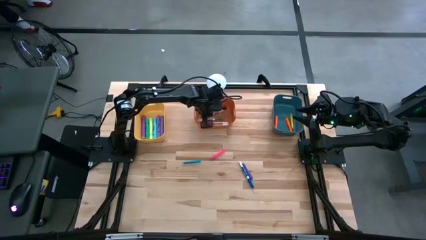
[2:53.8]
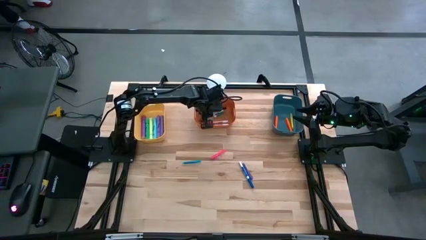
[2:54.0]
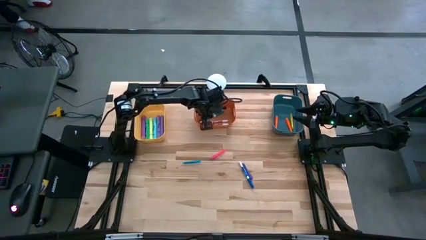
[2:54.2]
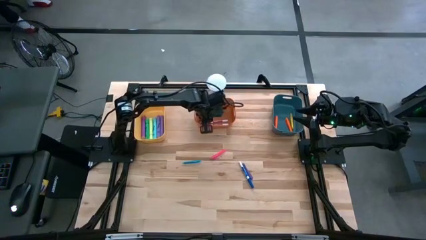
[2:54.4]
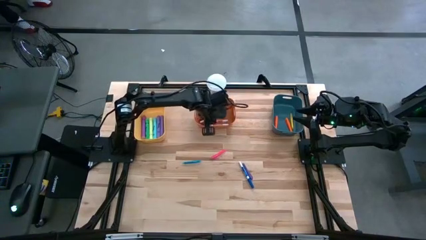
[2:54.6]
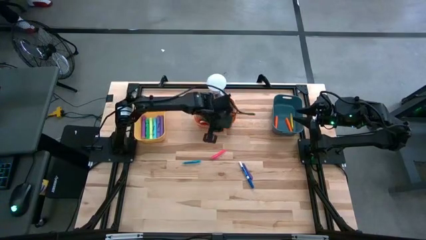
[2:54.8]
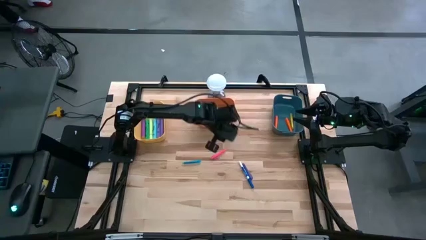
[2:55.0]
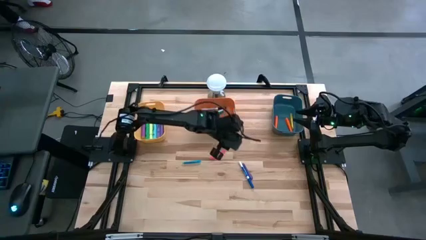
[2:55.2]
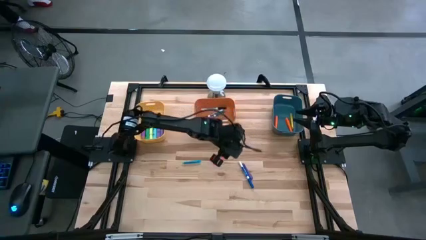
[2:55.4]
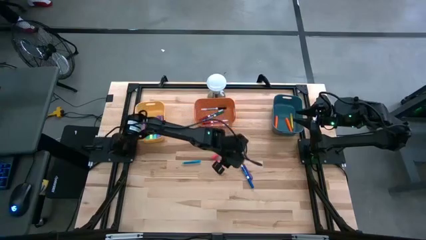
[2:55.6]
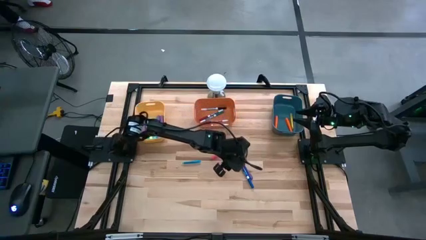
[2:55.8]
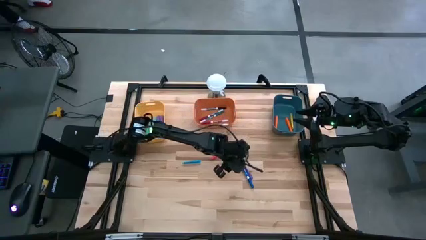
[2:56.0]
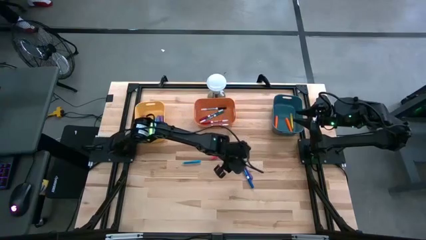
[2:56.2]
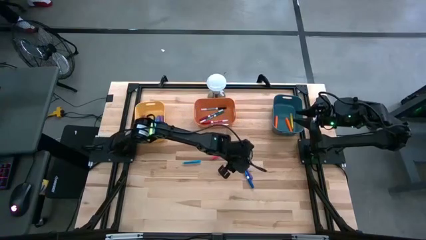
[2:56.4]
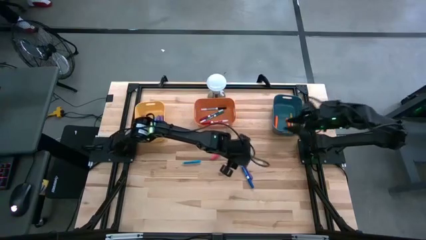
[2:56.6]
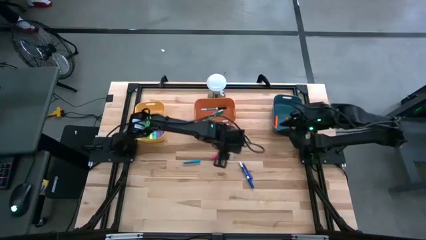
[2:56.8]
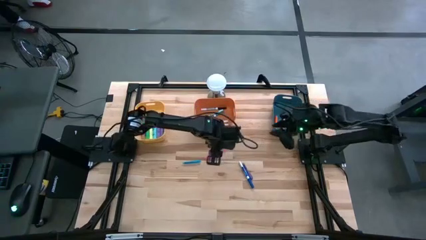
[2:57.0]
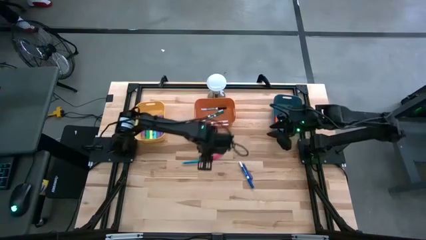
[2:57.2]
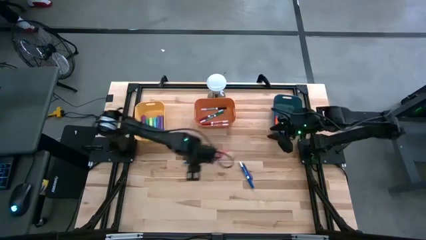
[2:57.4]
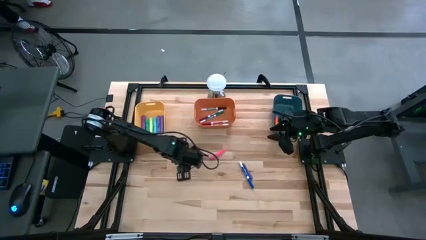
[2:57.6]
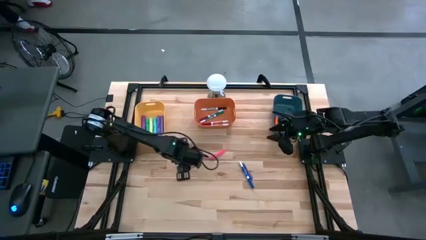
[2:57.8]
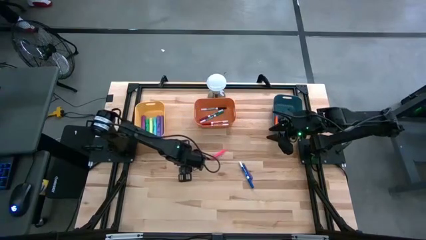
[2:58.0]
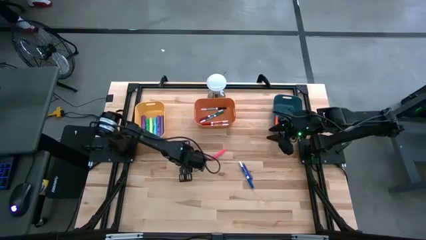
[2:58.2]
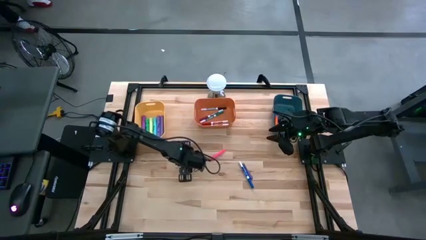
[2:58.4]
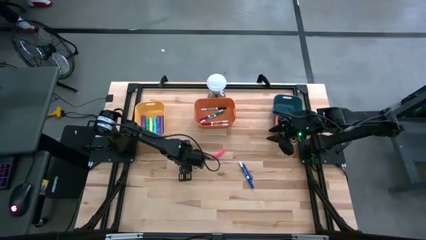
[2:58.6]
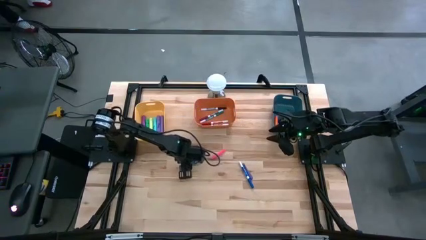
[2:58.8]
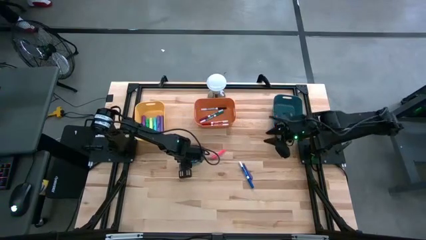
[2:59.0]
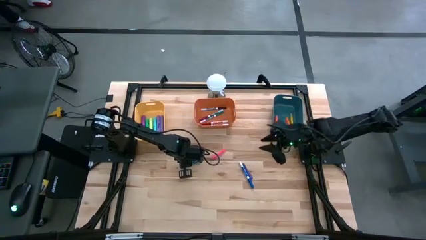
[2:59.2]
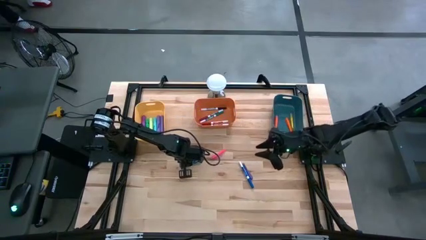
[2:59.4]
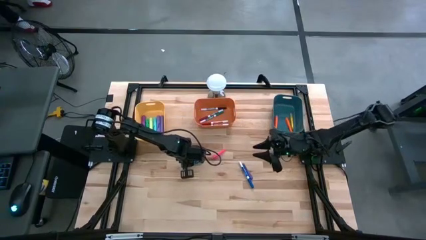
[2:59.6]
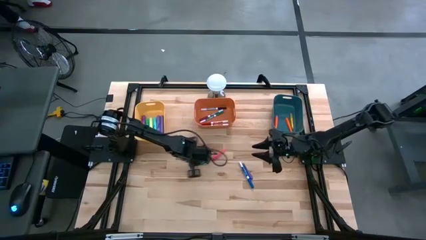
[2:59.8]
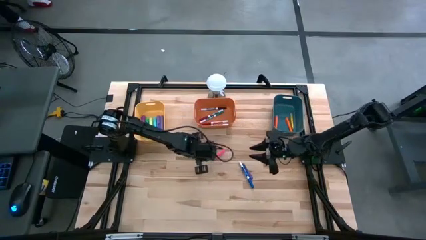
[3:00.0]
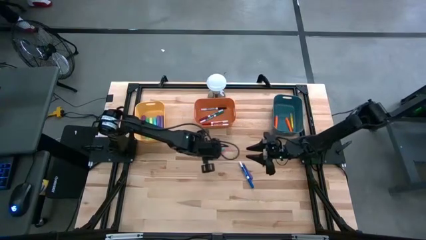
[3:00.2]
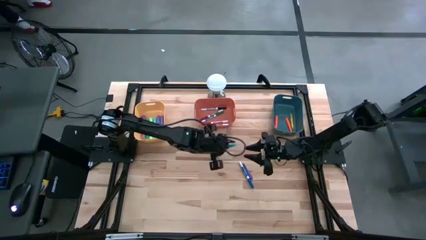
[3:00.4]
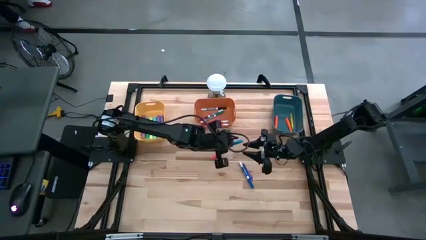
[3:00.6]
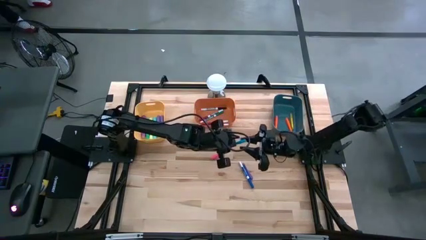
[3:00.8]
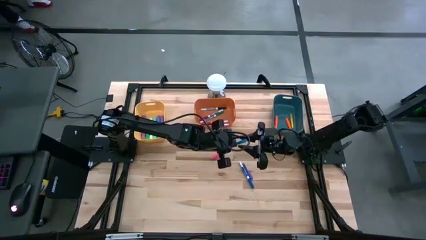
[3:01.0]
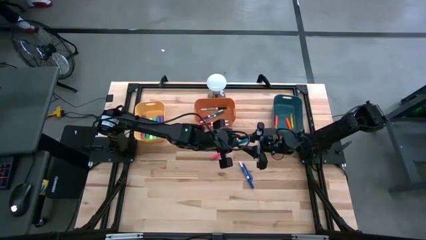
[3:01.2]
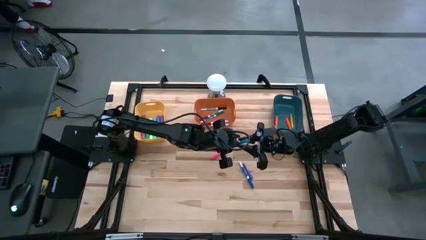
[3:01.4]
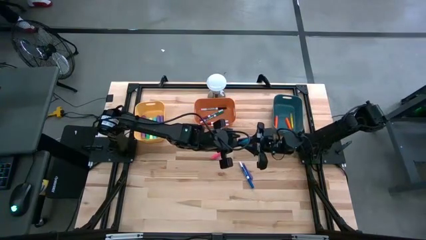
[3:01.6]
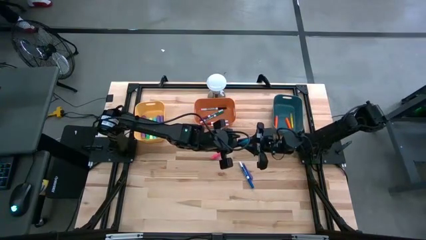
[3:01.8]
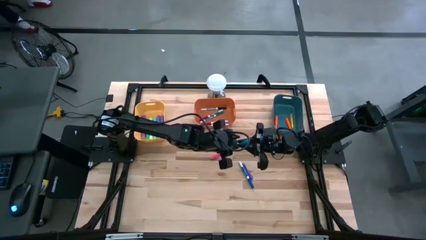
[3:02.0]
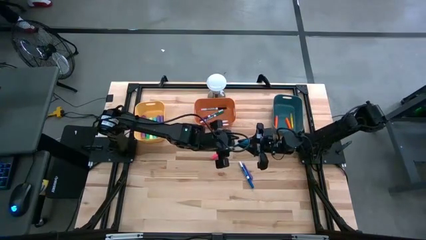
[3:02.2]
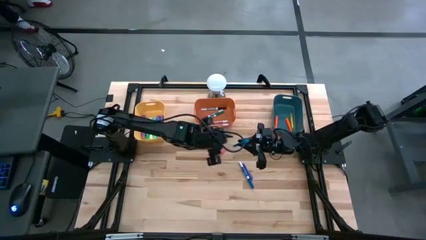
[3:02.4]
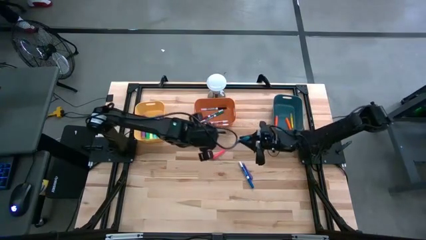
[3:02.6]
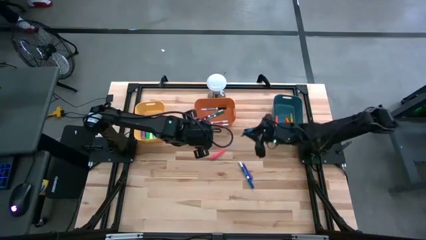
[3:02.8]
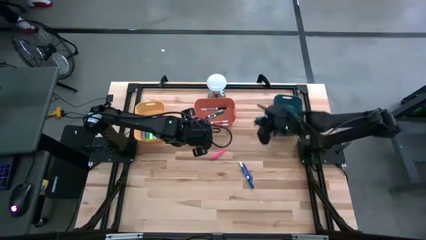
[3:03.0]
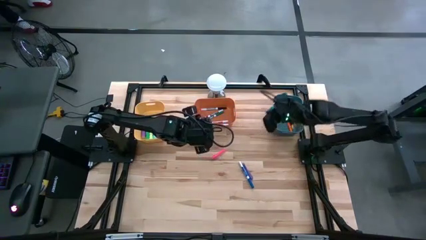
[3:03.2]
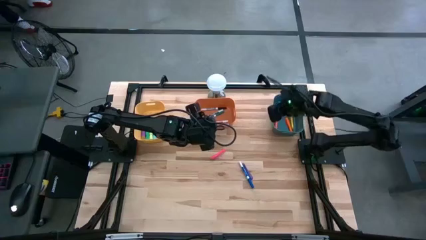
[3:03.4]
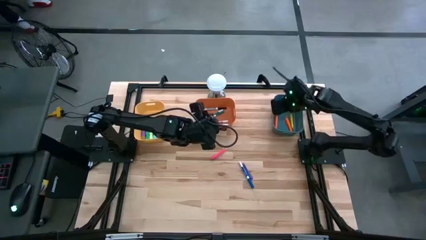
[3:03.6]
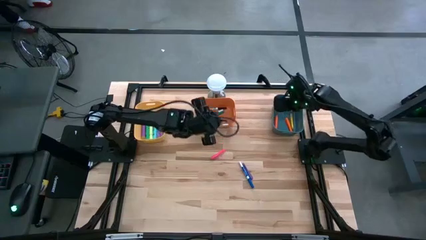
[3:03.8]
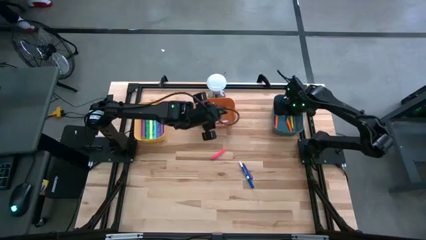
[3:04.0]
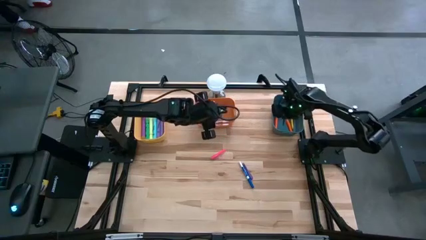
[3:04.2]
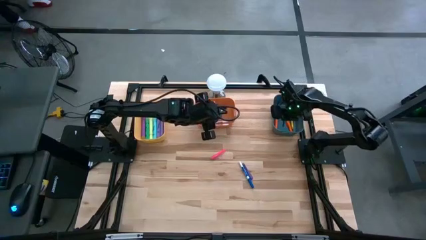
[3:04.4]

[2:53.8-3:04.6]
Task: Pick & Place Markers
Put the blue pen into the blue bin

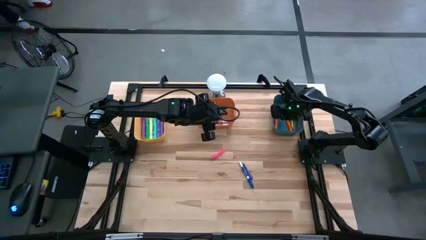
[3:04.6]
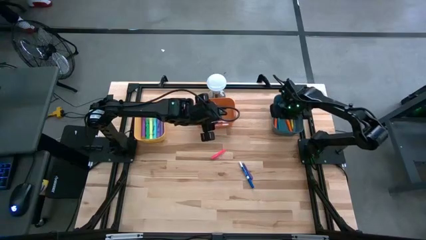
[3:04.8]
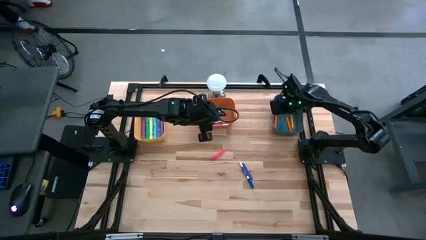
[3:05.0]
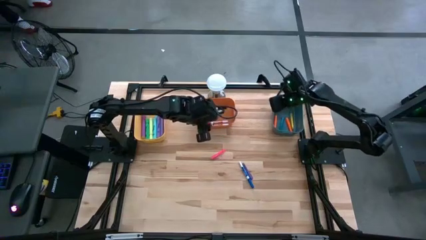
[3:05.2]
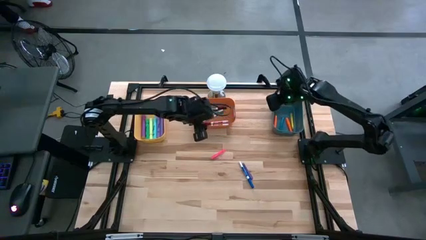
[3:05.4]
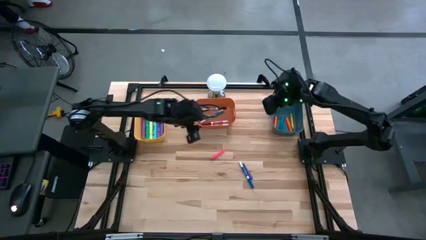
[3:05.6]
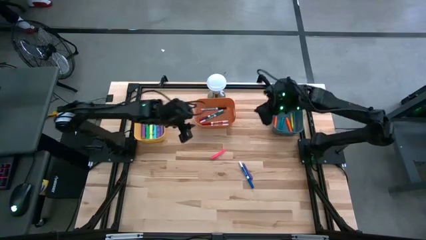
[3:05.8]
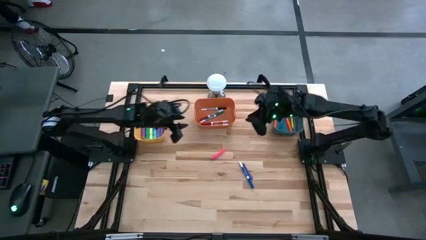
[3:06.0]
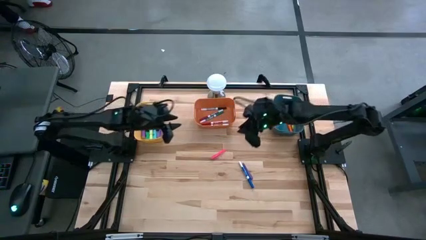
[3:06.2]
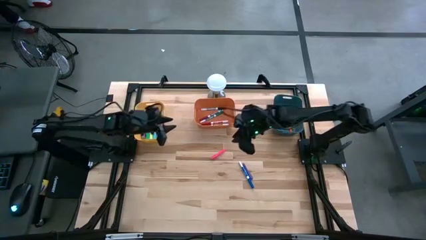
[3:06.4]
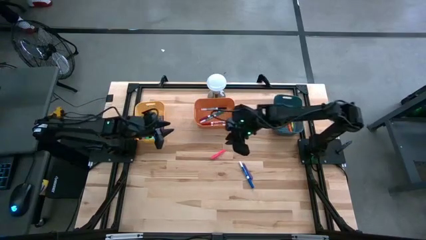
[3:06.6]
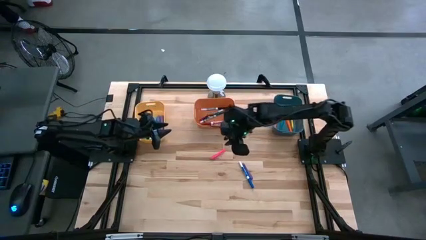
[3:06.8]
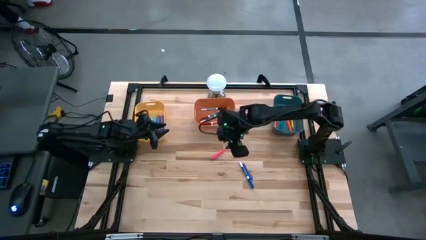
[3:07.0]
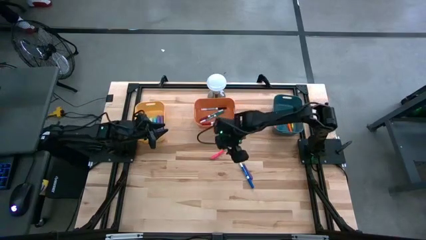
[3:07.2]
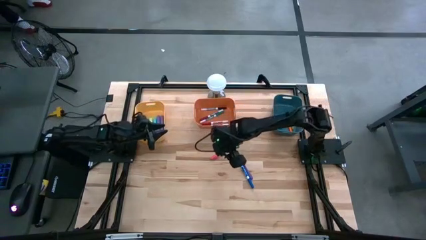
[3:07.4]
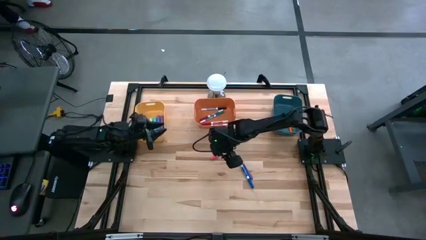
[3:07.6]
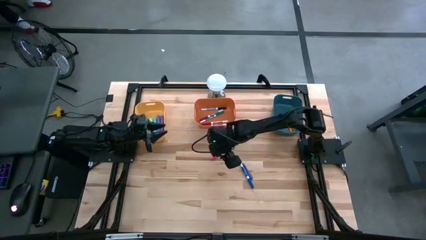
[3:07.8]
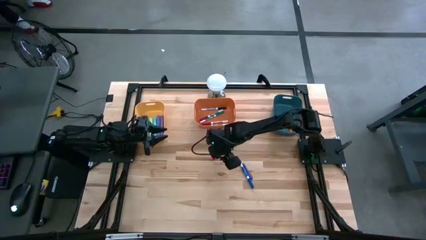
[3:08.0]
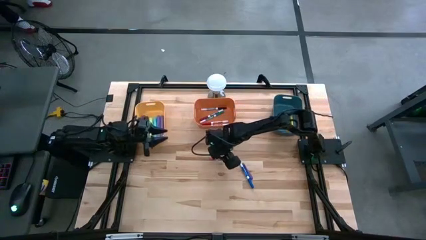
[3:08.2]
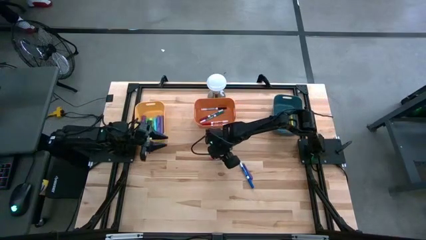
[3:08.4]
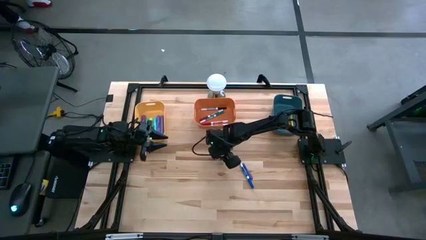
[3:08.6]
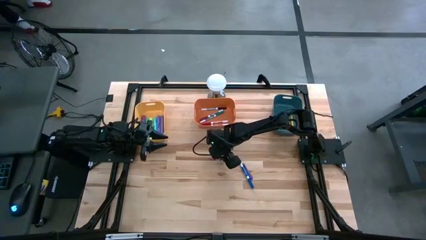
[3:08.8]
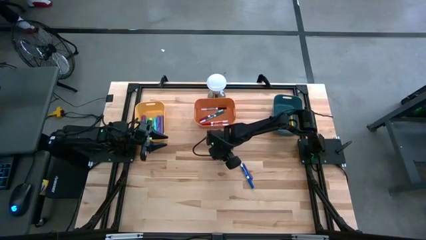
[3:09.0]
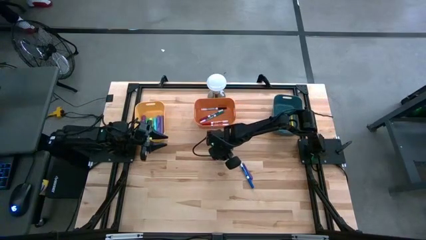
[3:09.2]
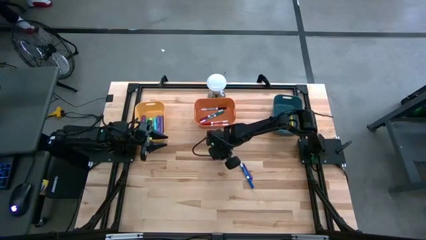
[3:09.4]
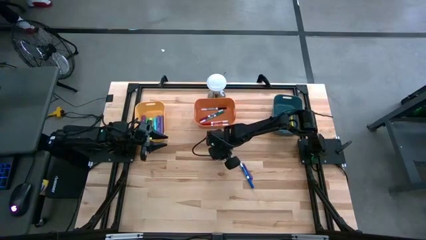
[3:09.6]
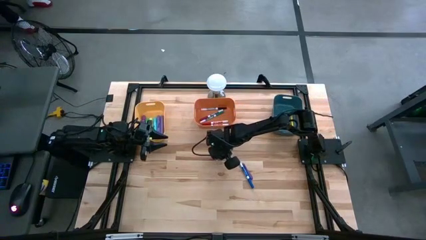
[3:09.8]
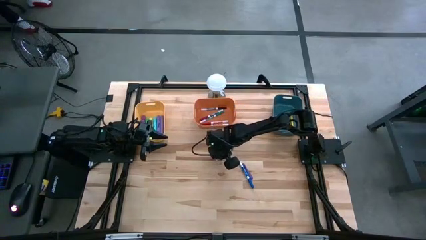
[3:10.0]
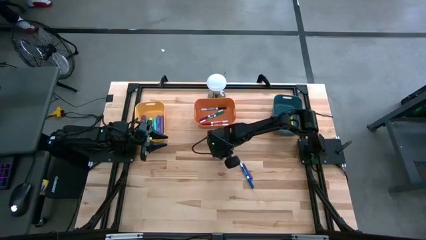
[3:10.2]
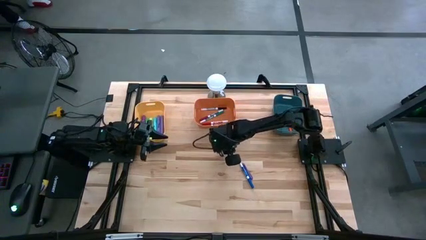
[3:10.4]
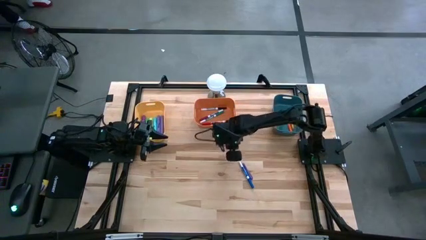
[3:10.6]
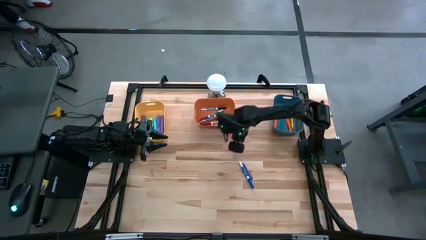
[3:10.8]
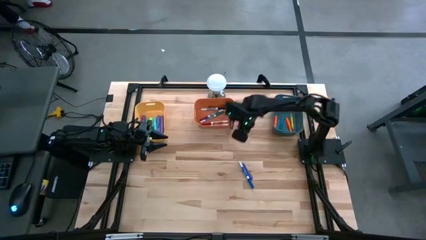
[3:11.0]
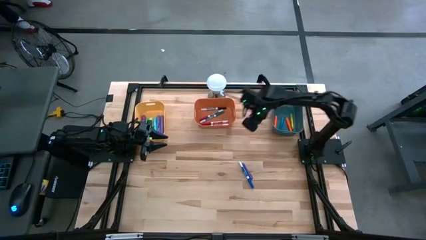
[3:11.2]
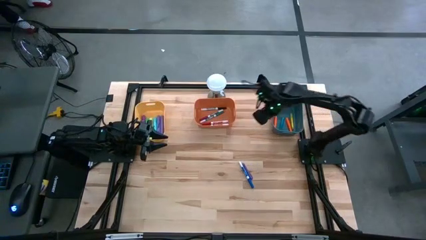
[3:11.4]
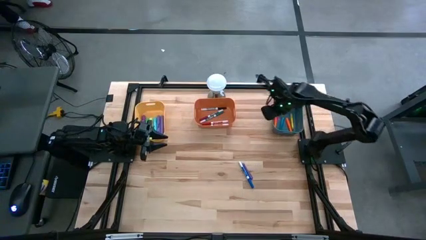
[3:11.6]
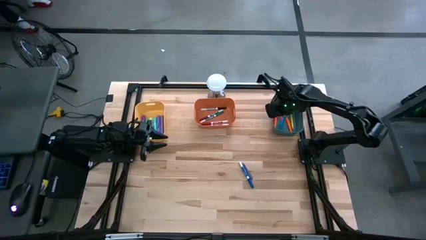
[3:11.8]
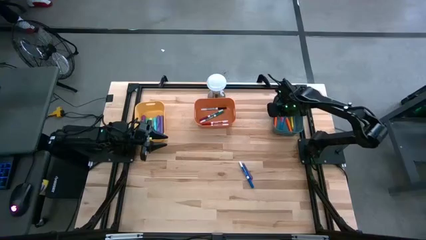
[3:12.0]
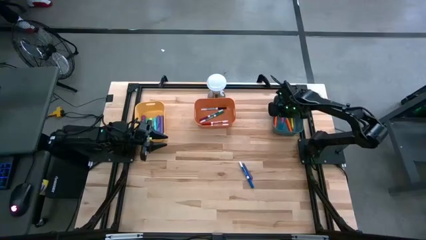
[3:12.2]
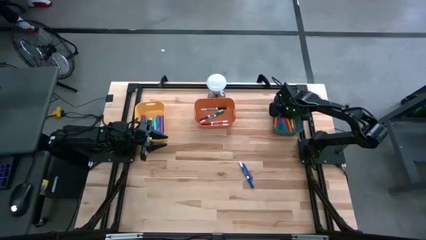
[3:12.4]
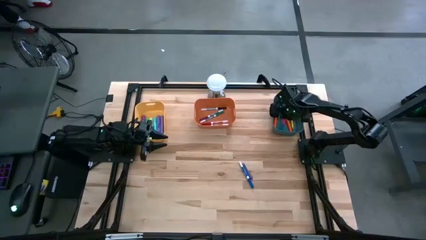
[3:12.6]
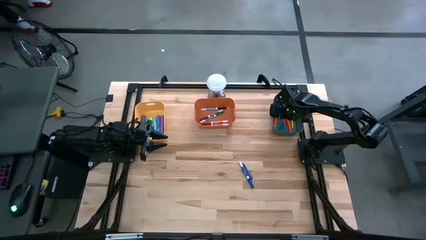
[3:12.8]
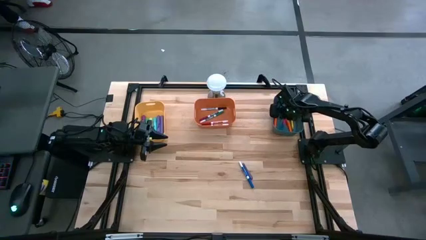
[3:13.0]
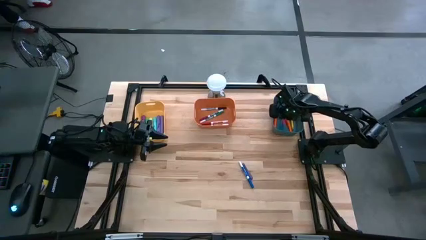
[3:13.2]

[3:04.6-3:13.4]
Put the pink pen into the blue bin
